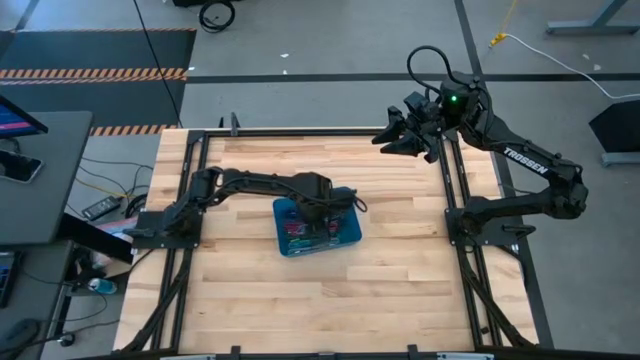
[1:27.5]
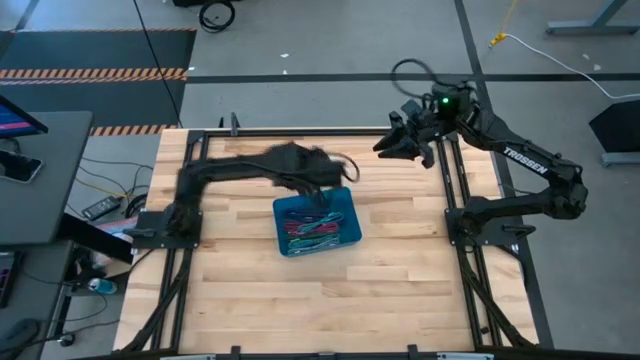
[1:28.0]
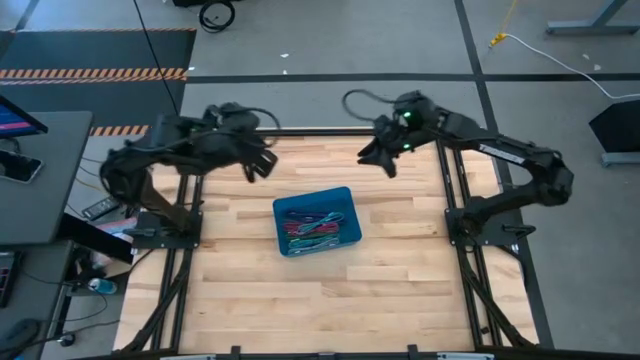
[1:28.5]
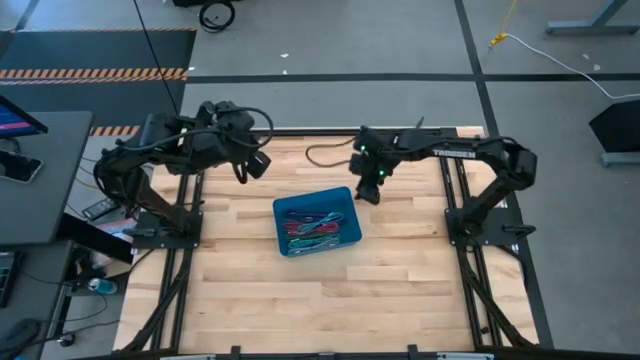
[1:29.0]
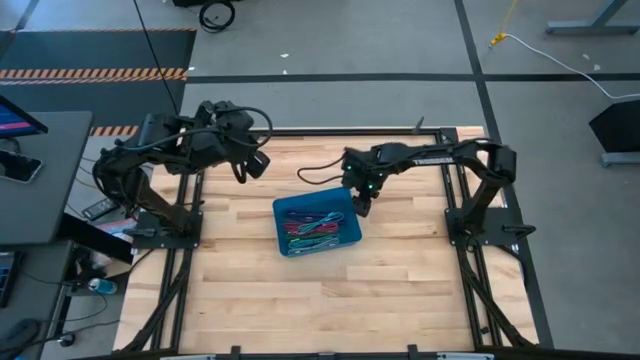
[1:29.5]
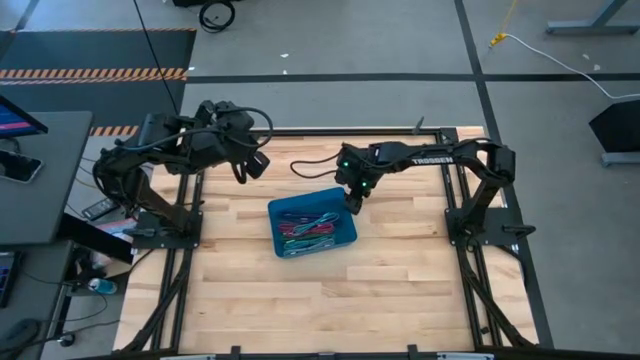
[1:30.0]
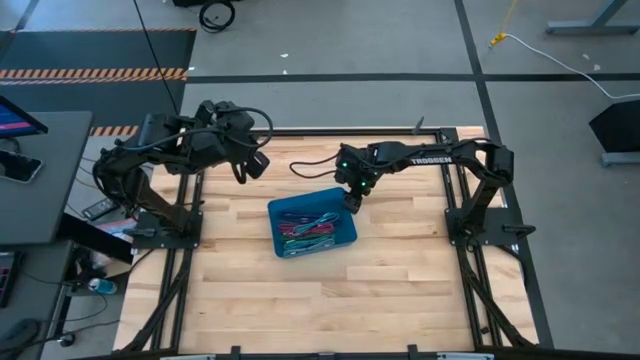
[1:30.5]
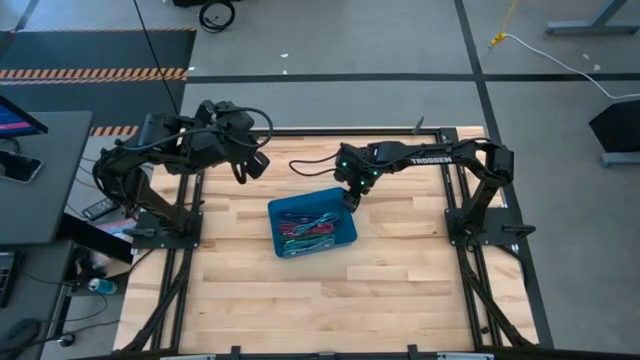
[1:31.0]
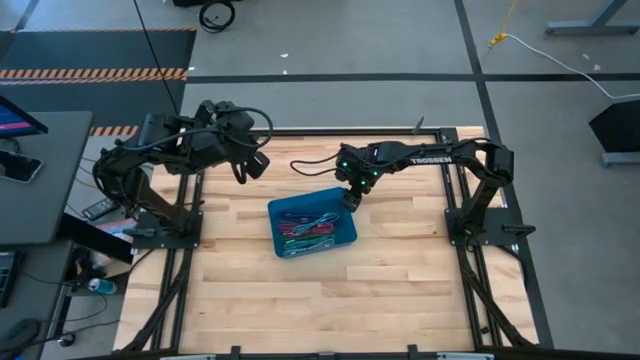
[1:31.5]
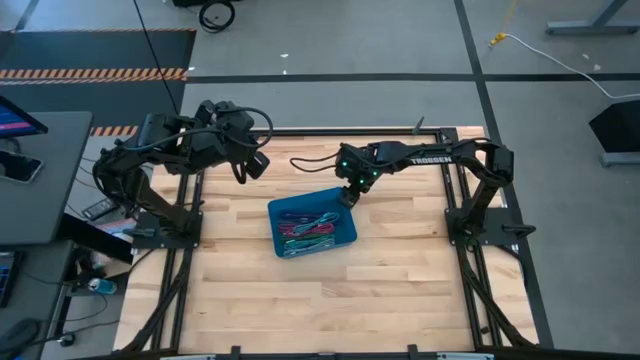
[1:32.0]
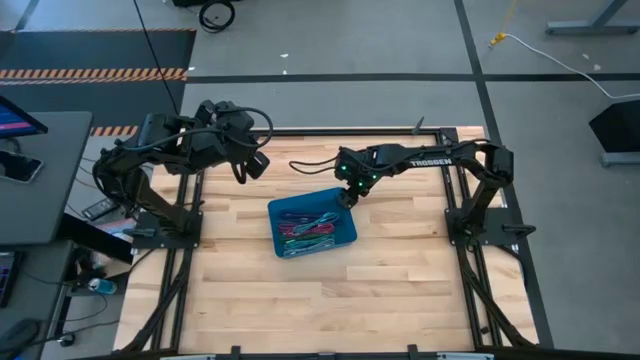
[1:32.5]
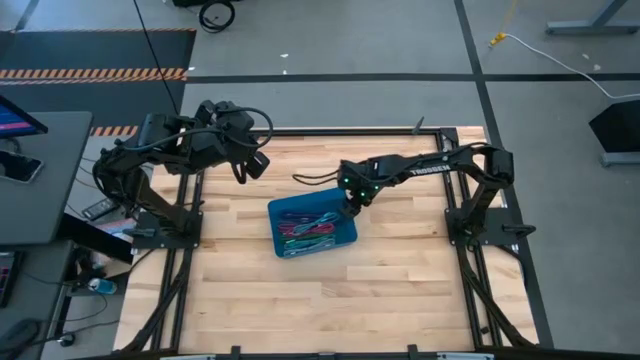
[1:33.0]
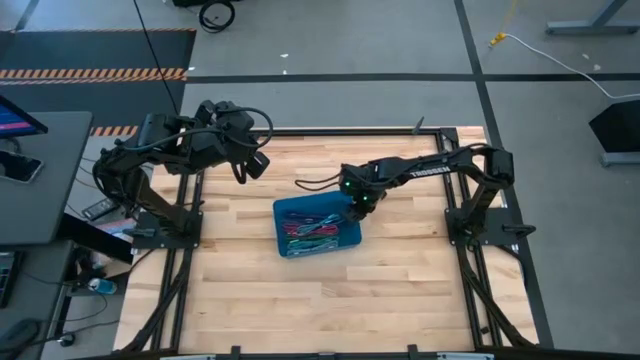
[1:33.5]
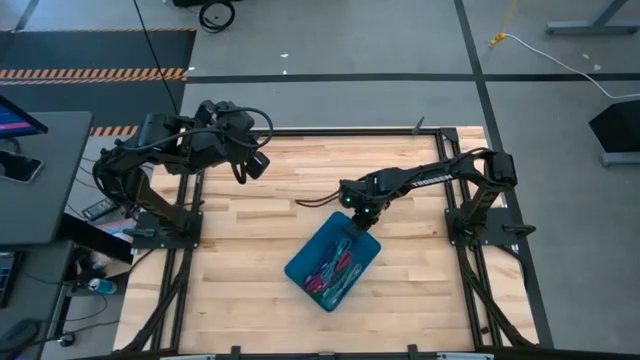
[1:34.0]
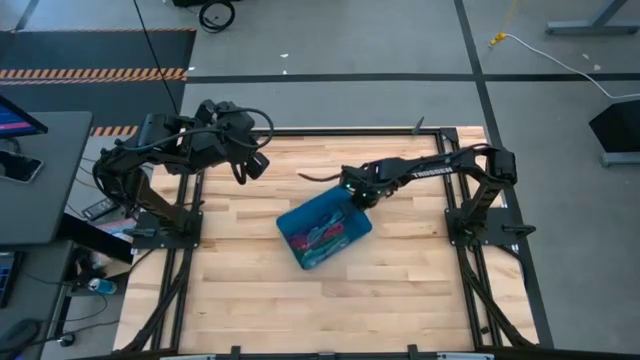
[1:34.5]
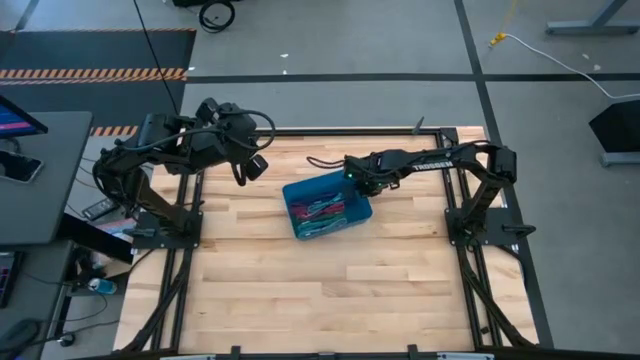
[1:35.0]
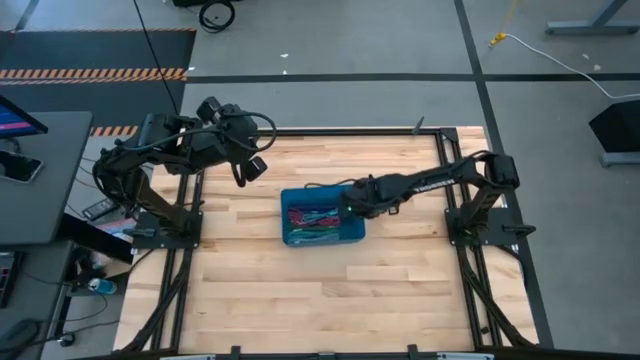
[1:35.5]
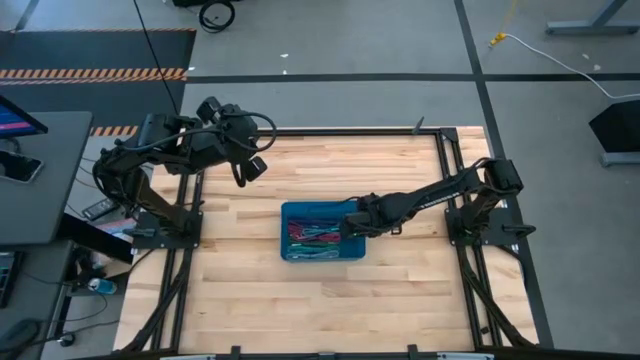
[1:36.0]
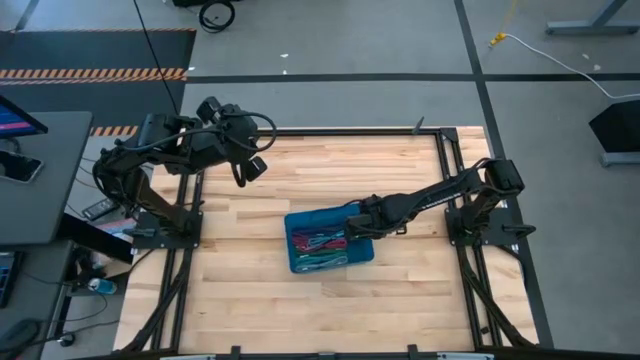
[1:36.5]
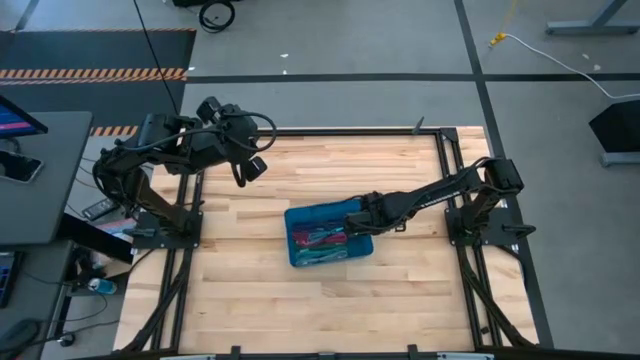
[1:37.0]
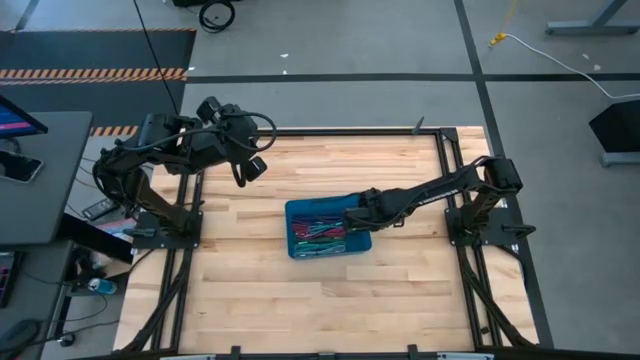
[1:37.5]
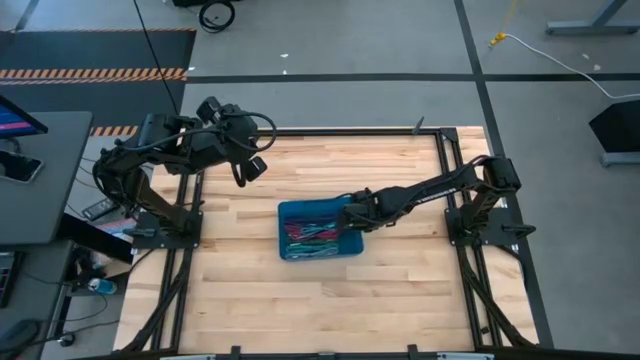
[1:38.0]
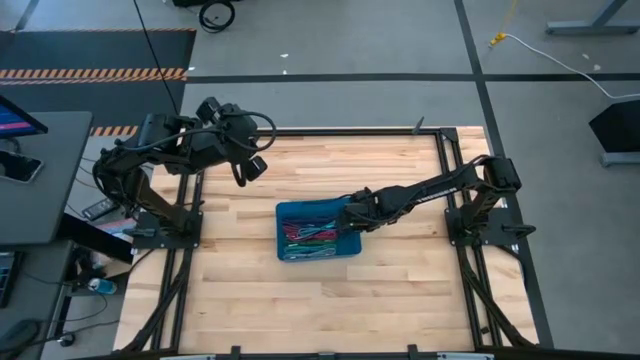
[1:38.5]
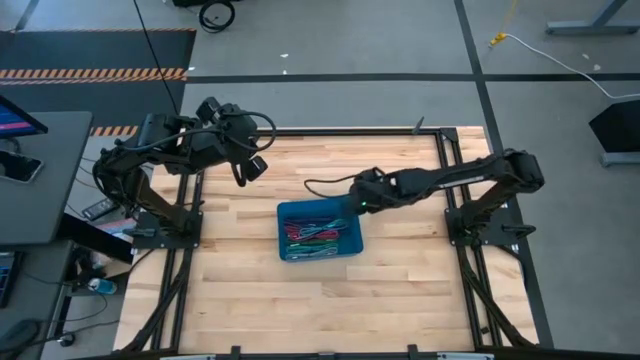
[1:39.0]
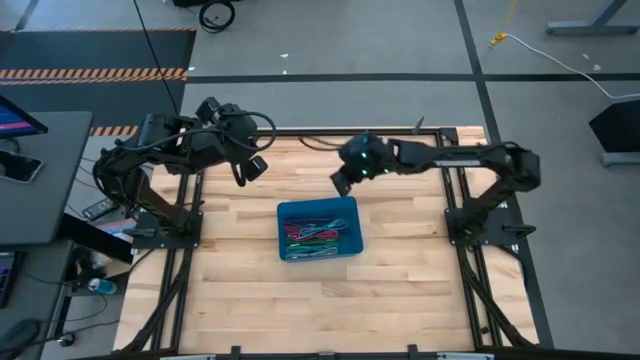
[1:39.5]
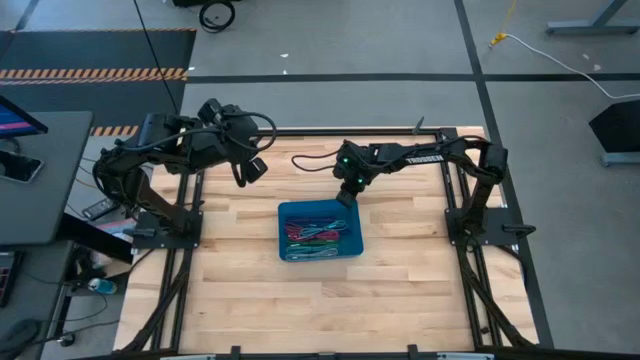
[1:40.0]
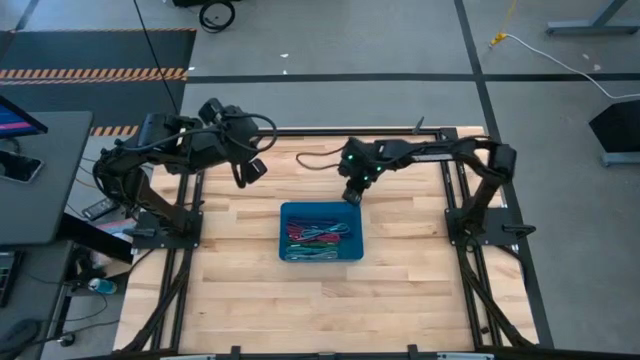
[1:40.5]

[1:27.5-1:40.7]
Task: Pick and place USB-C Cables
Adjust the blue bin on the table

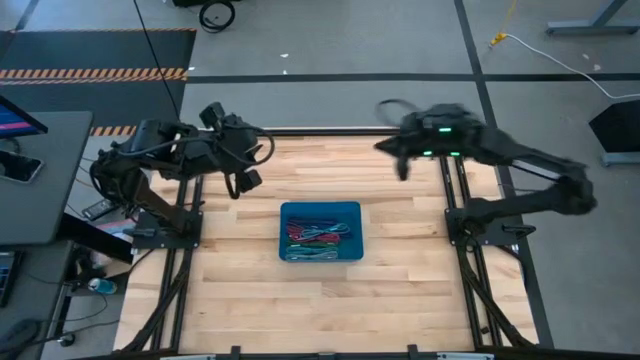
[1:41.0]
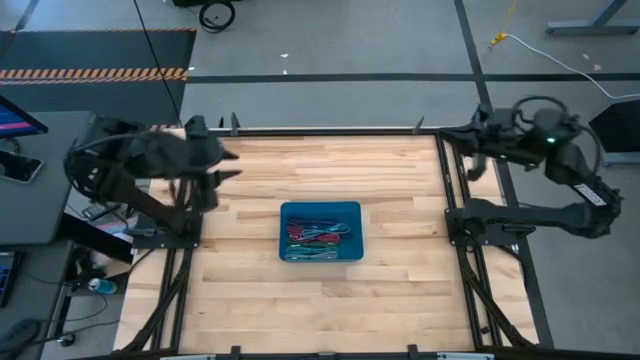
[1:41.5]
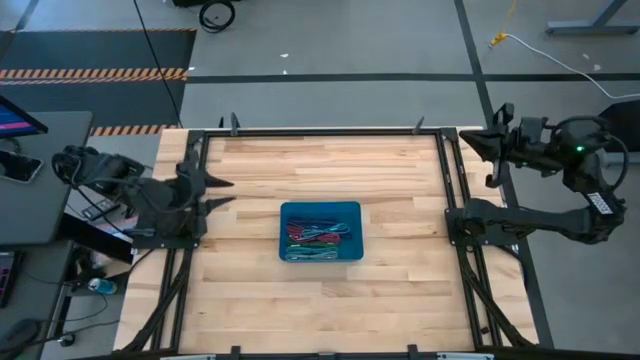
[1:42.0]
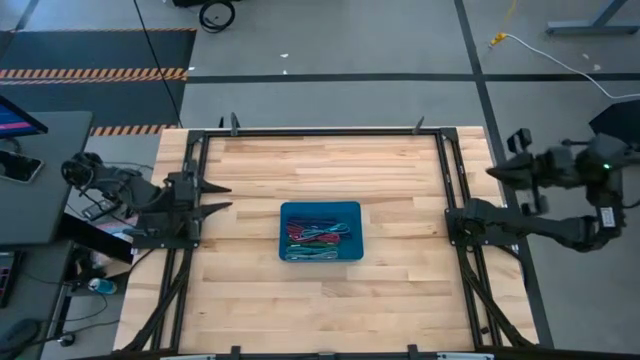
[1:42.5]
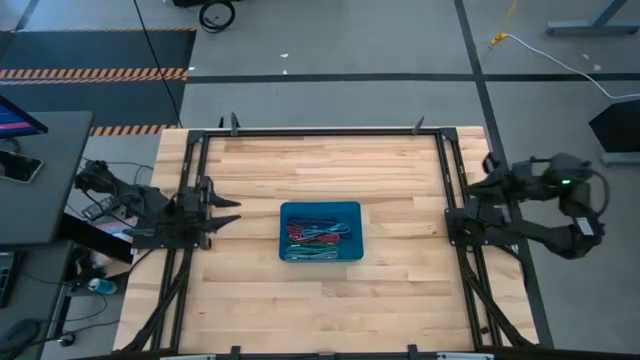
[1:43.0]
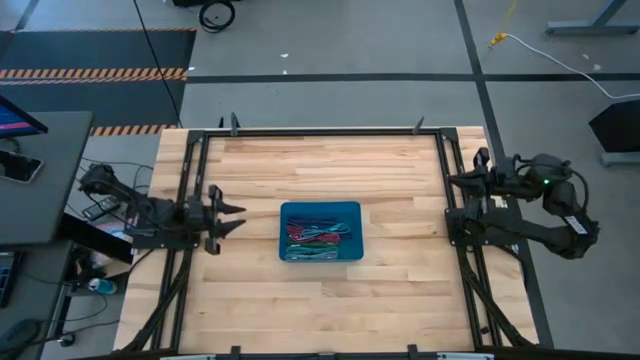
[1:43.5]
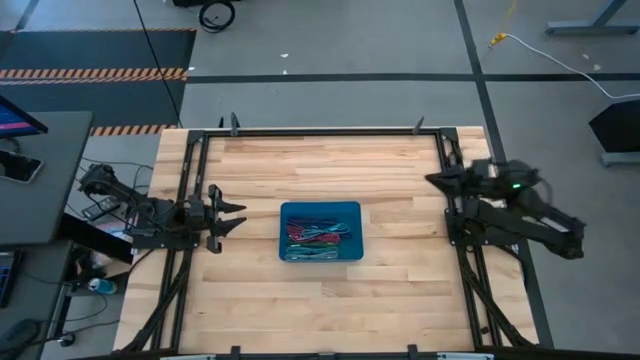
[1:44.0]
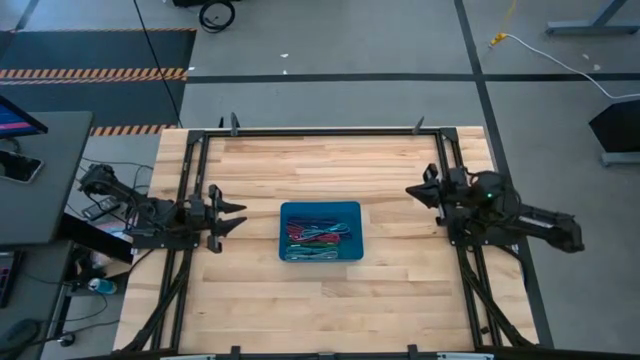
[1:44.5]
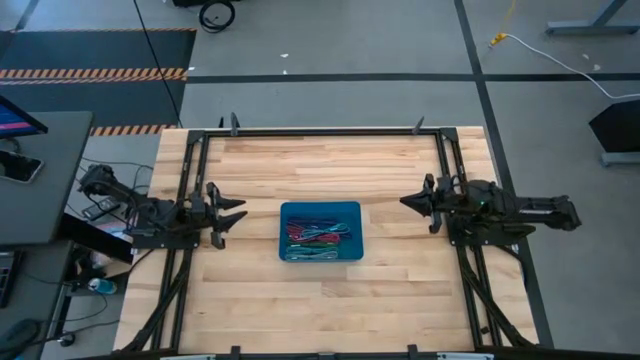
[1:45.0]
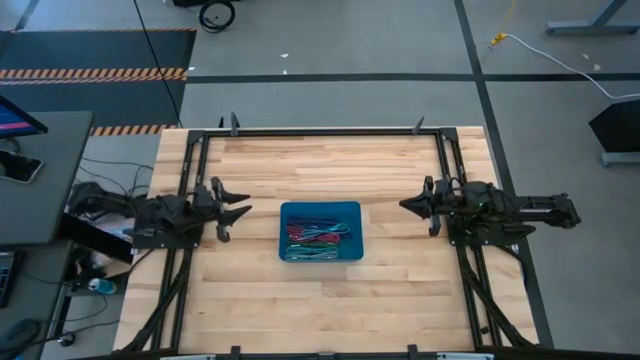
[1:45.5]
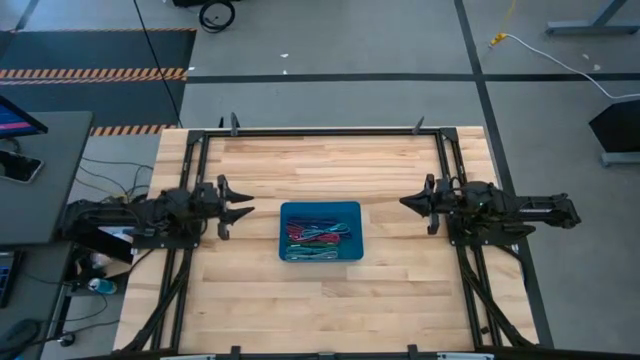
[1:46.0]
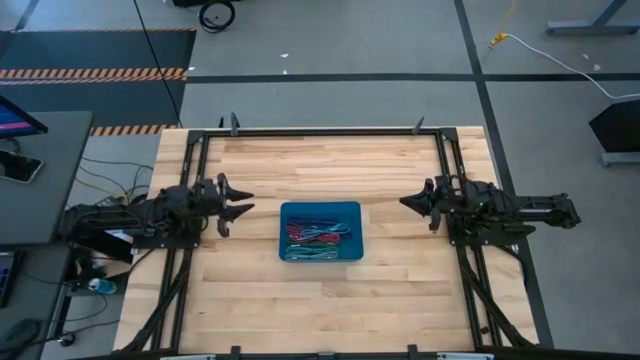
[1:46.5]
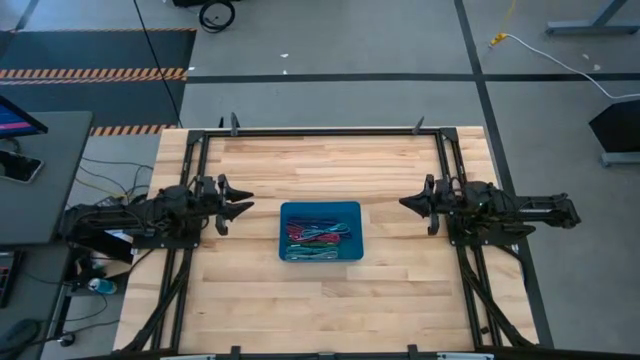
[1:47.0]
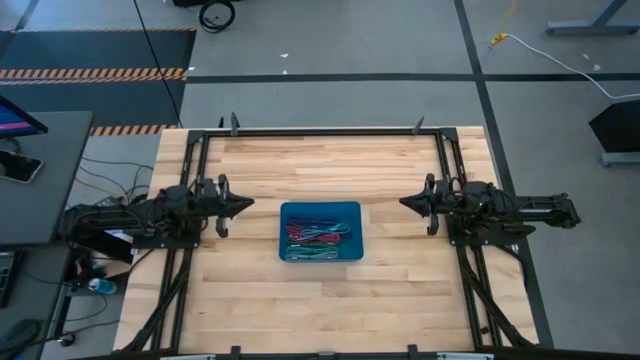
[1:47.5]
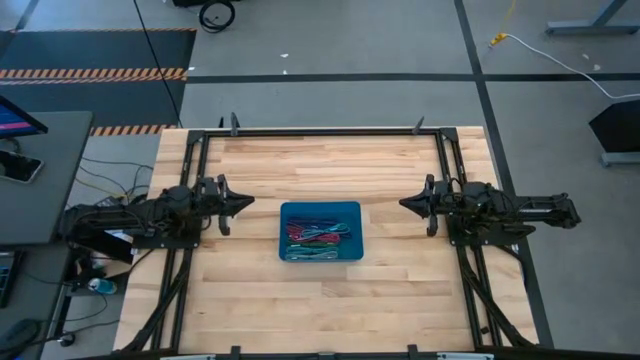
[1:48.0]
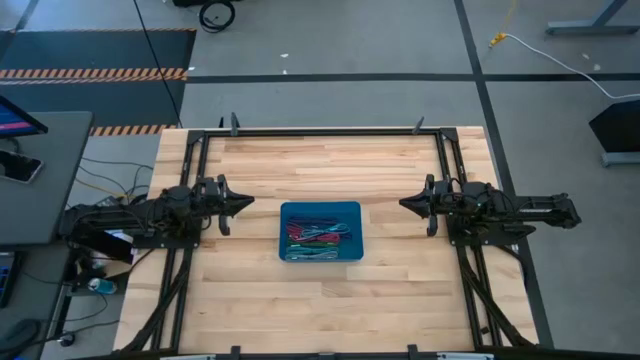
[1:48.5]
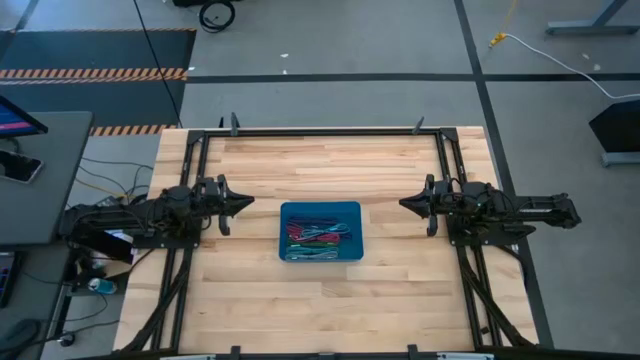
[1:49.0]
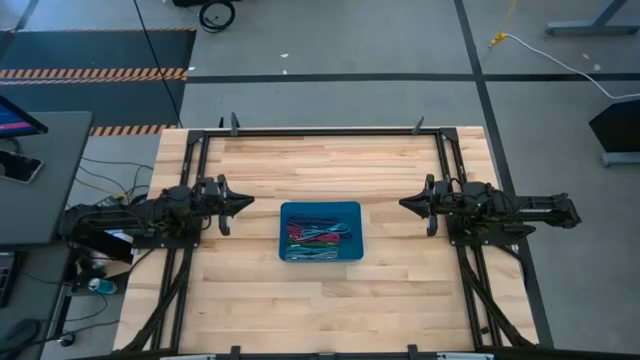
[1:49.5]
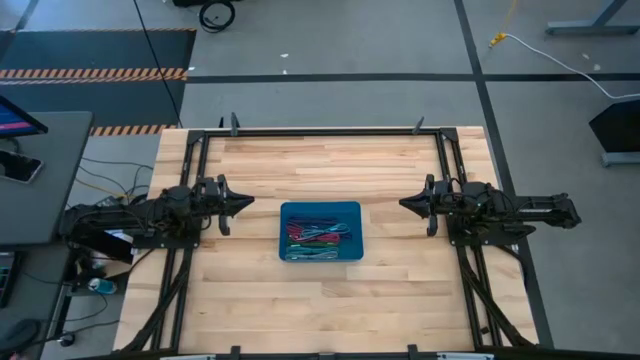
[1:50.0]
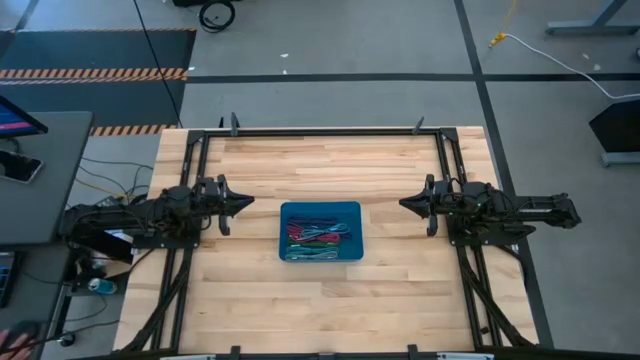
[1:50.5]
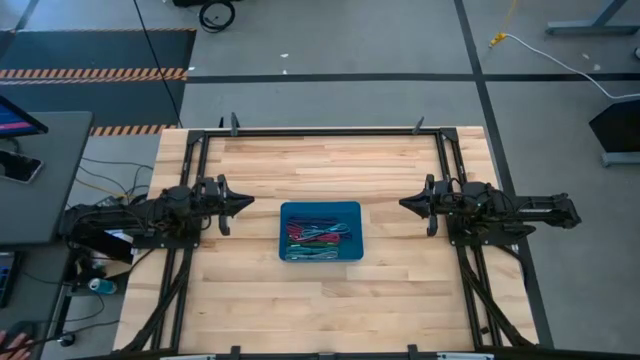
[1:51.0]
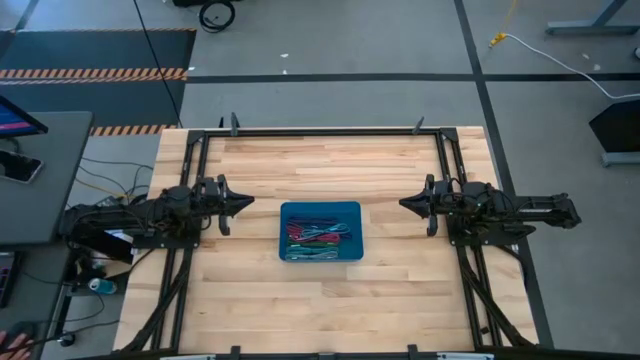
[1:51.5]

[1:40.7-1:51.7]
Return to Home Position
